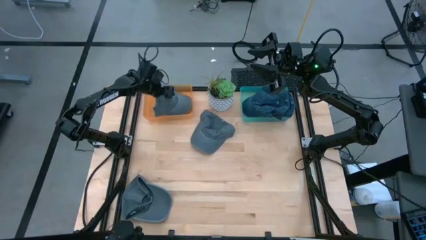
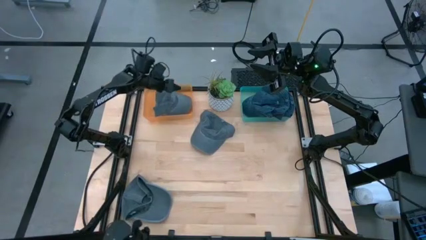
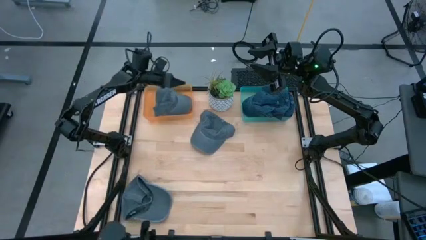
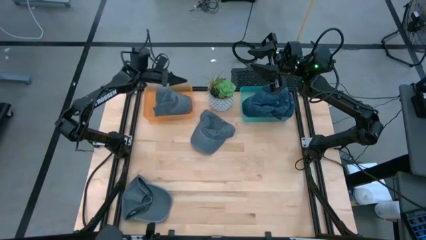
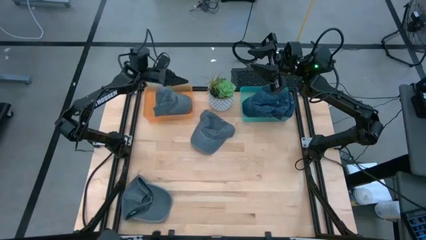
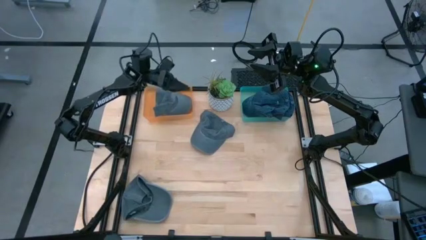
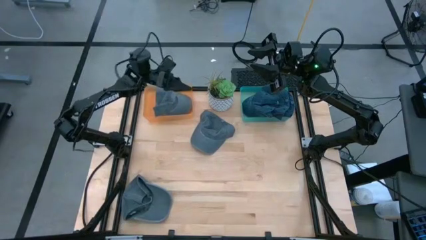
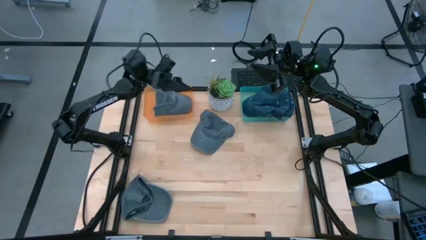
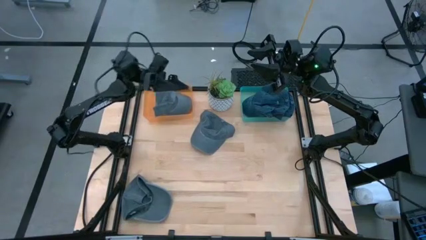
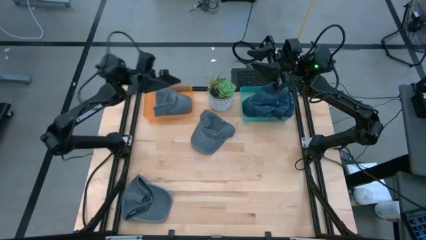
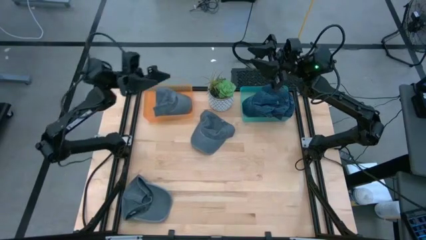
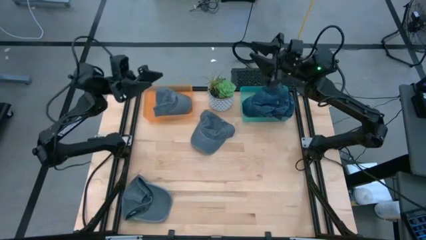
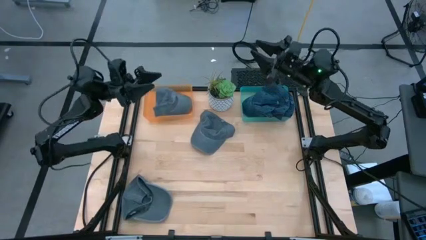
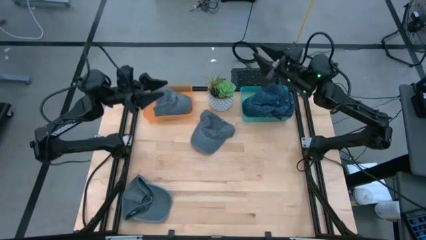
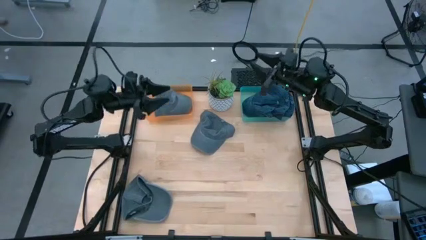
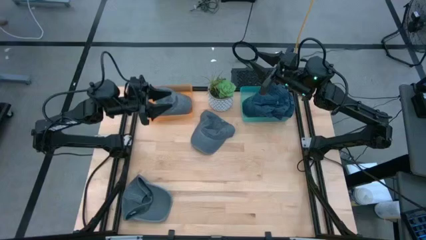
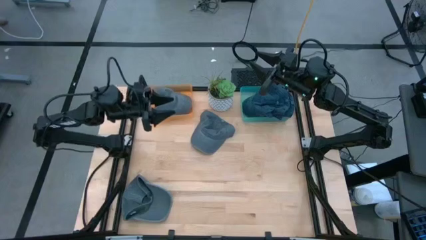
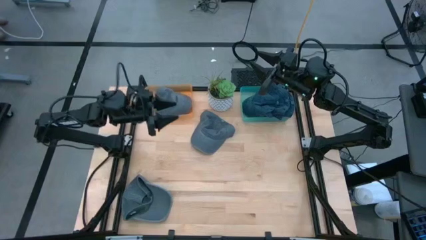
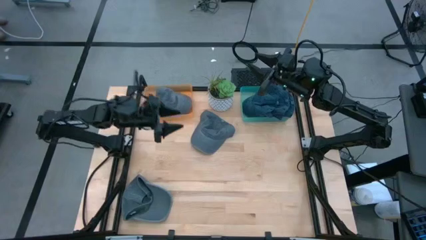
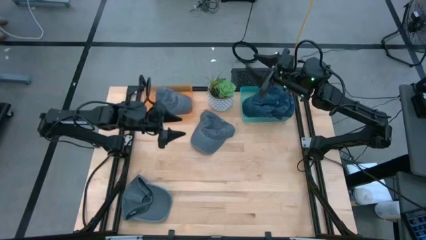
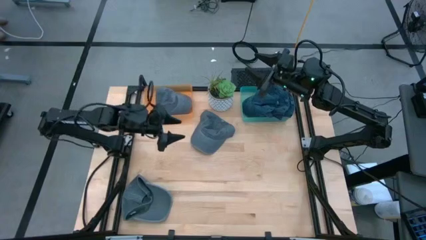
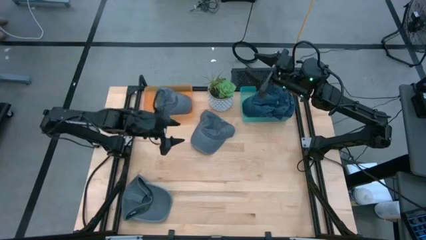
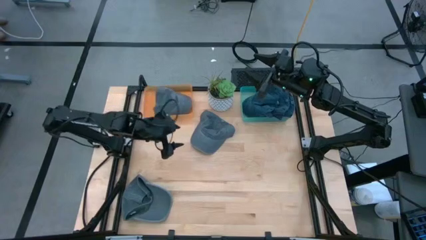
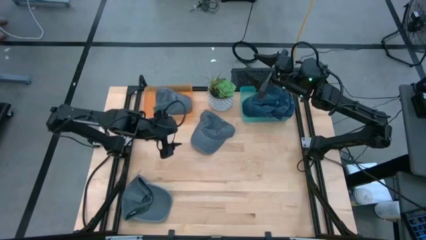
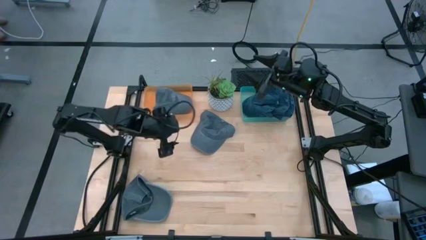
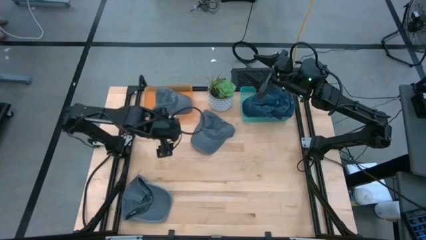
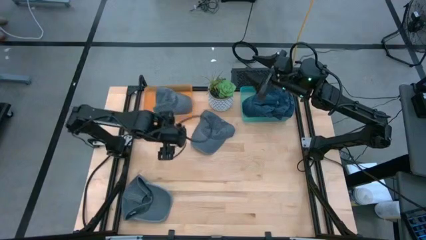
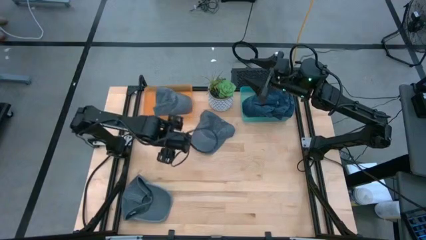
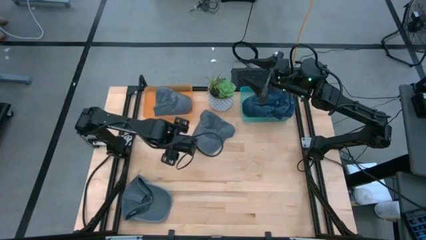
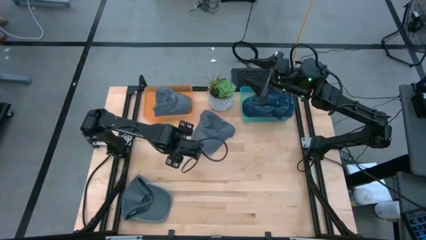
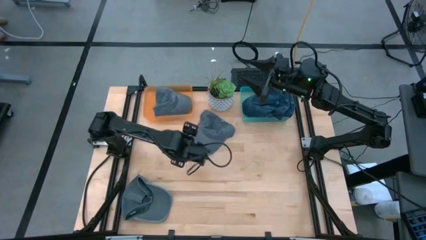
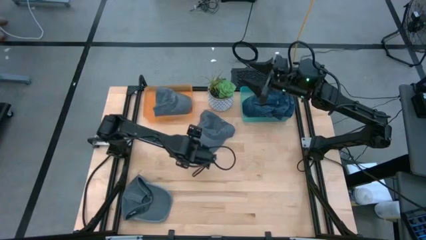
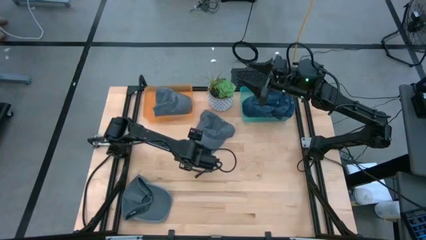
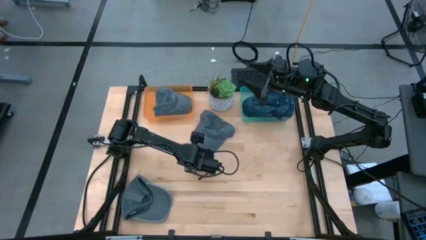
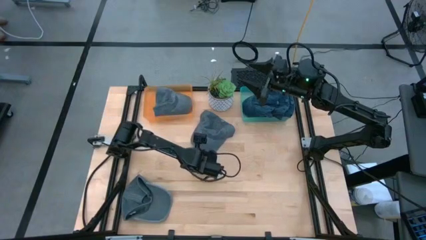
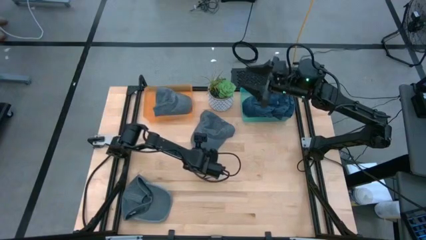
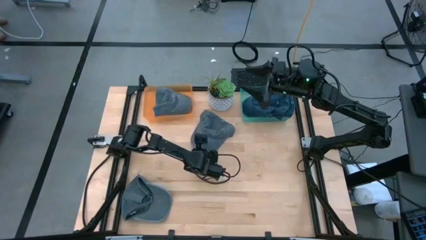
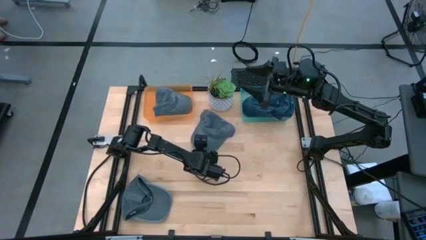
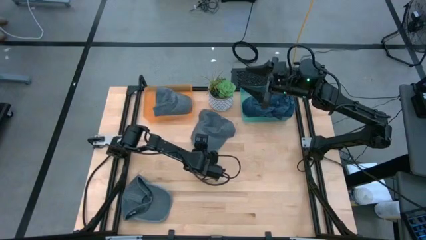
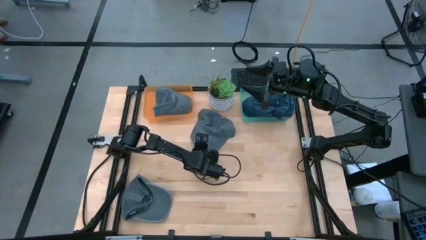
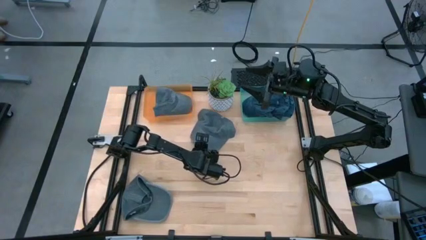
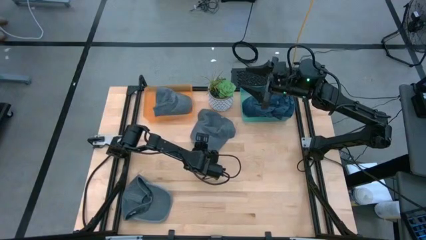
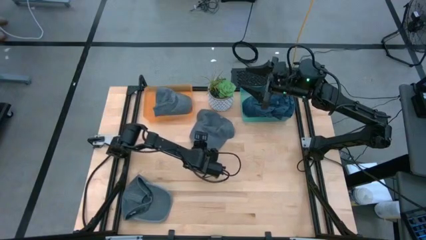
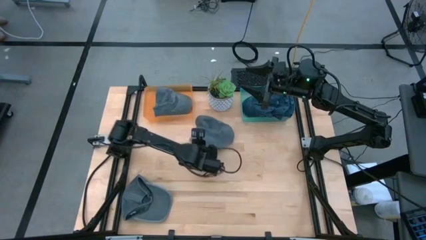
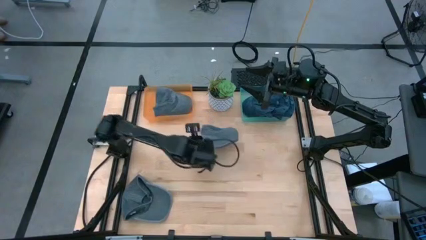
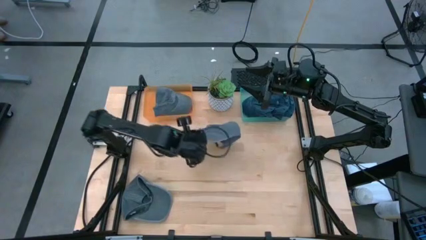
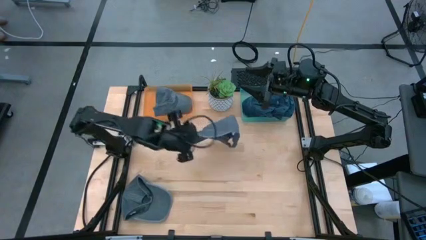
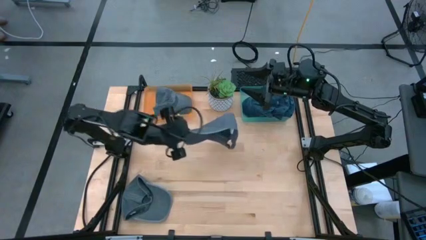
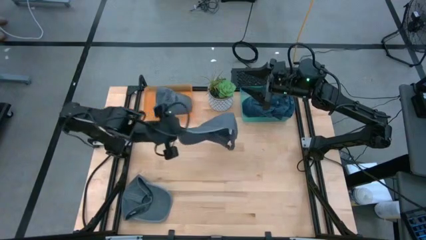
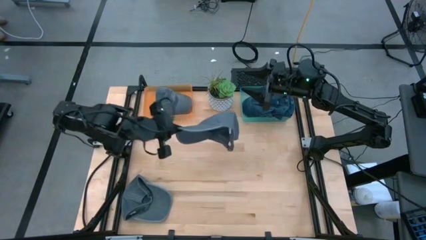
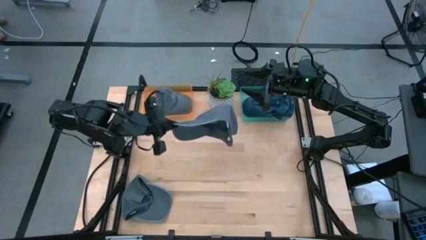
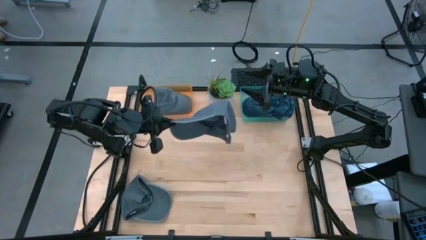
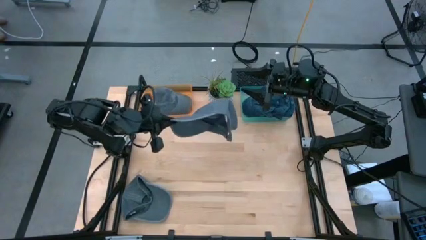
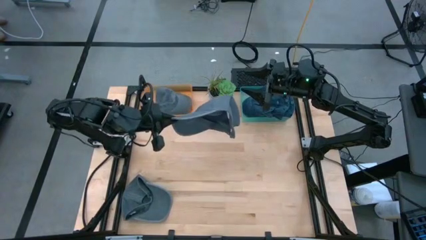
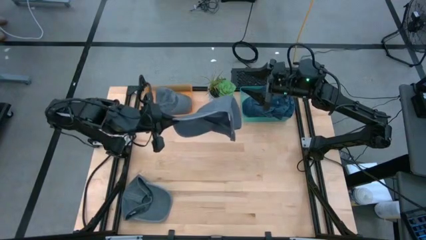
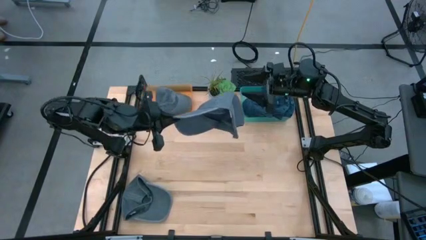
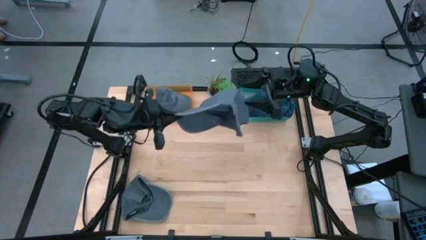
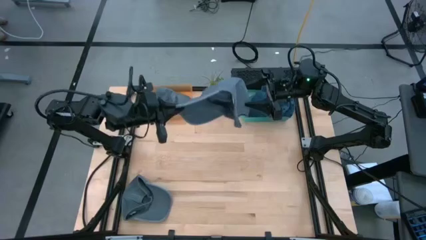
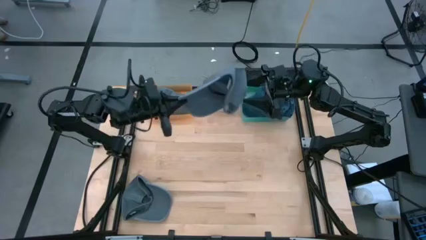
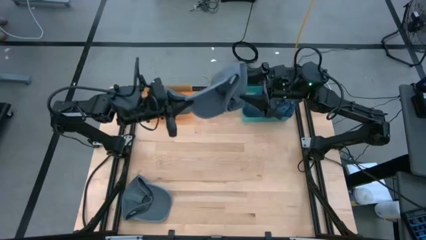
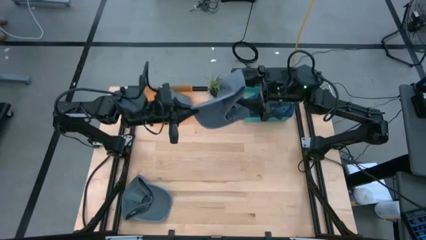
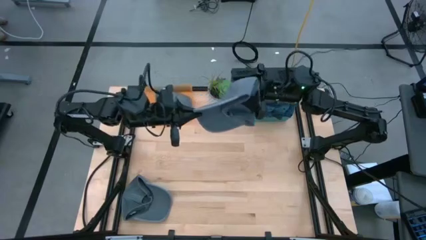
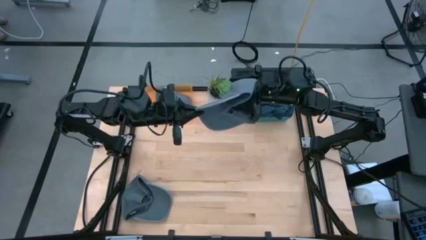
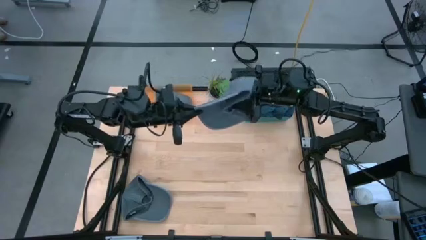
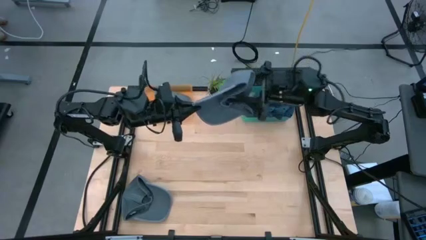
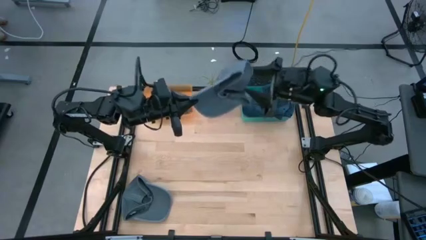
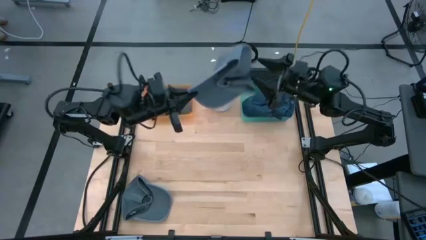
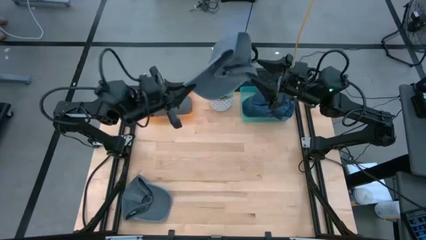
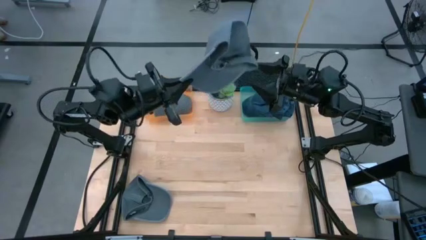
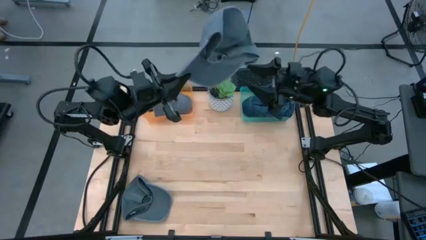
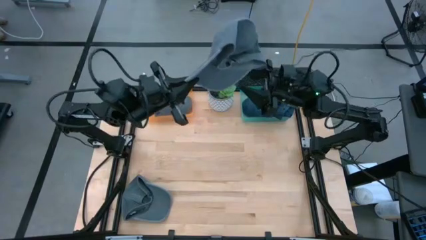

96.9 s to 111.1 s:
Task: Pick & Place hat
Put the top gray cap into the orange bin
